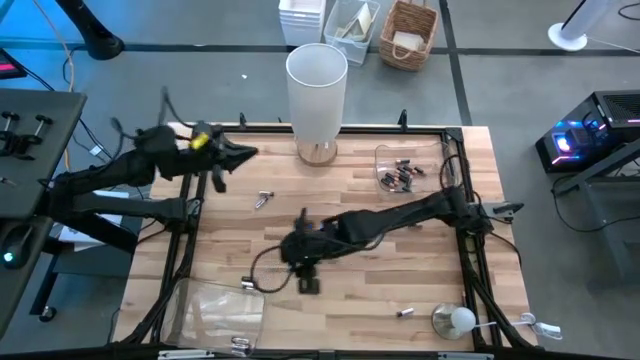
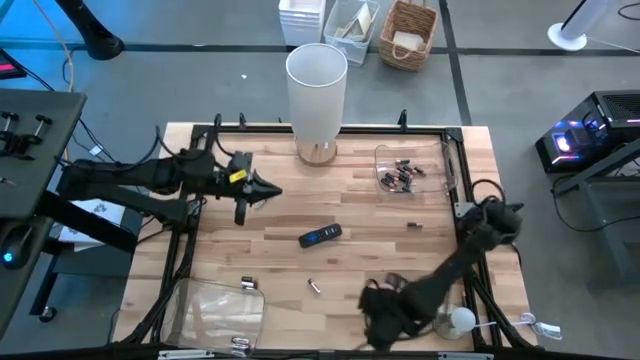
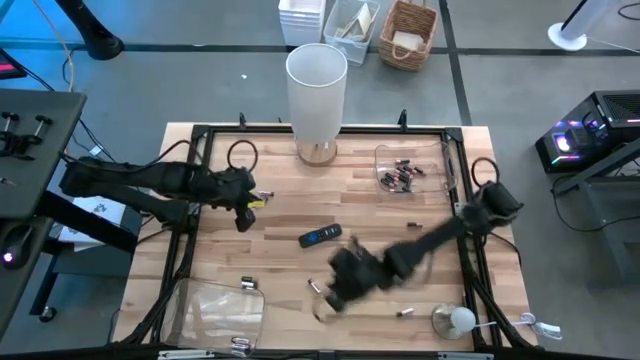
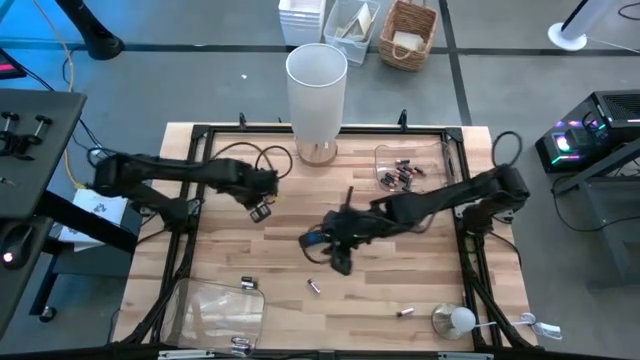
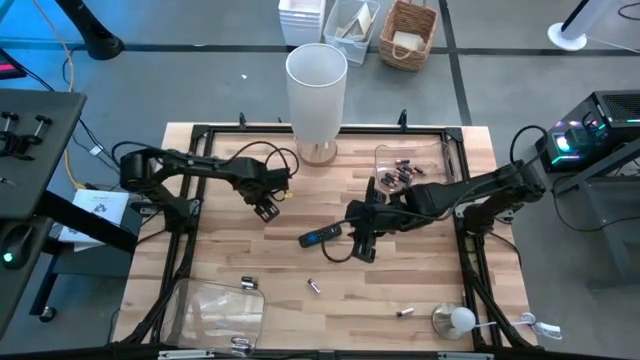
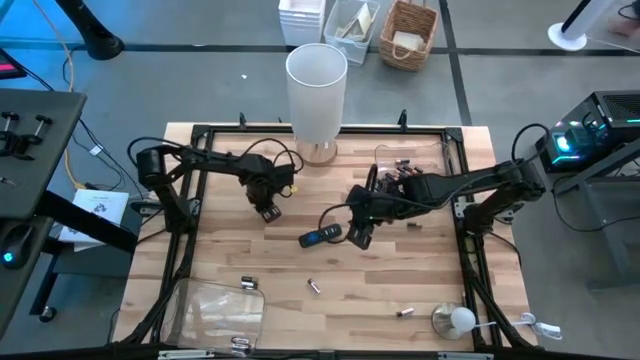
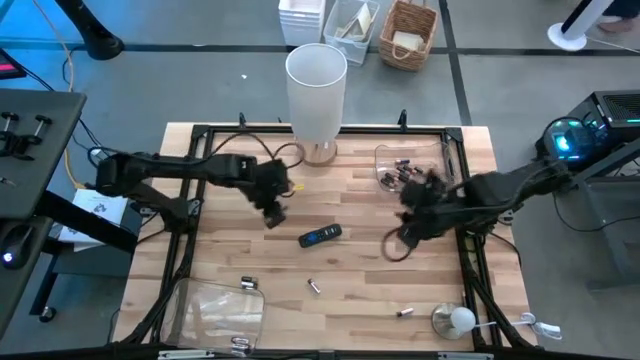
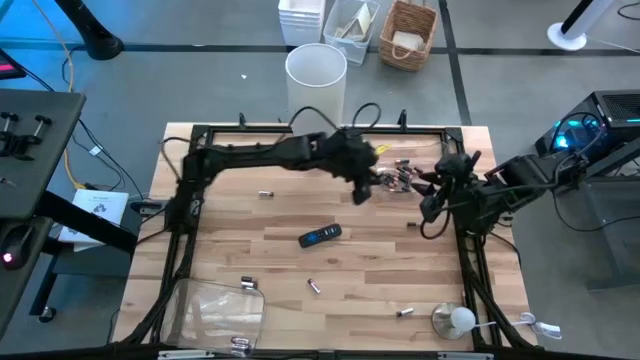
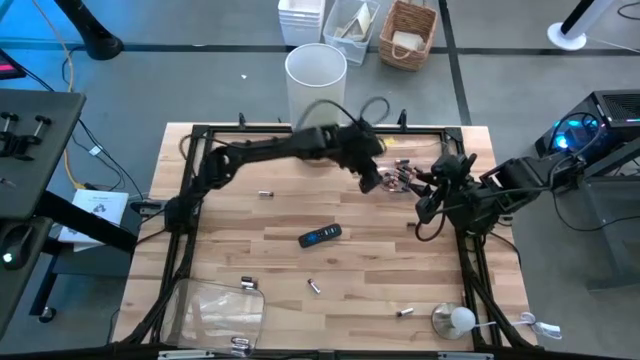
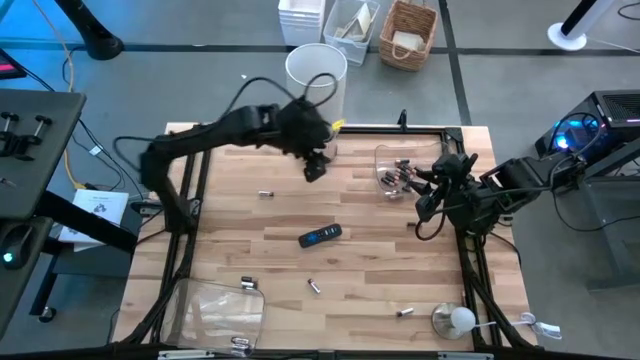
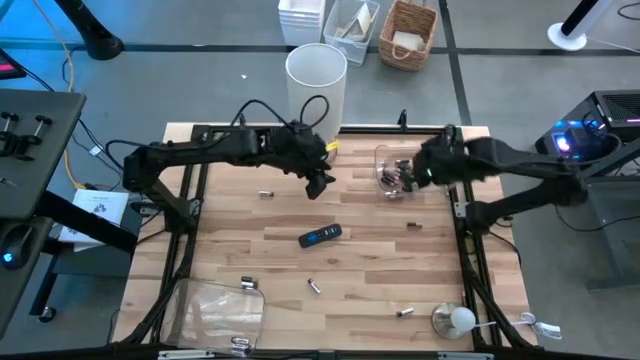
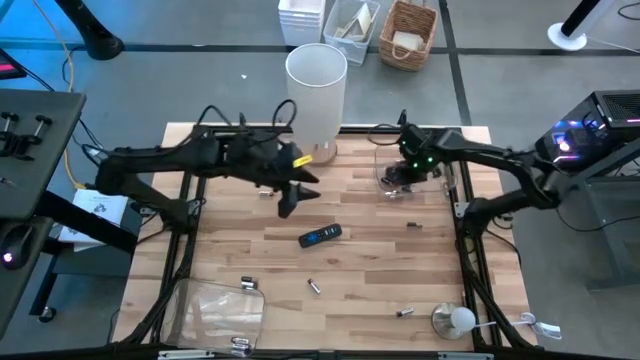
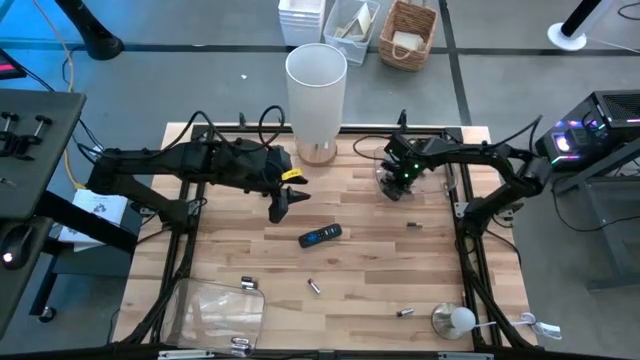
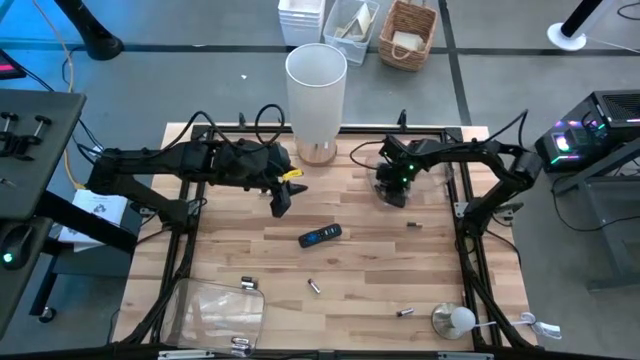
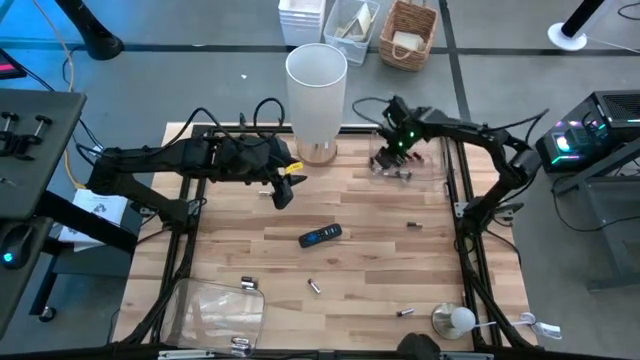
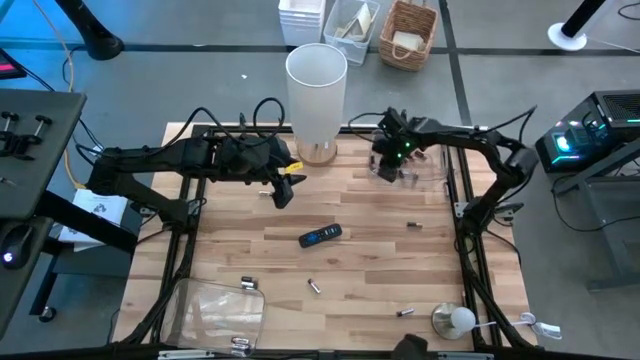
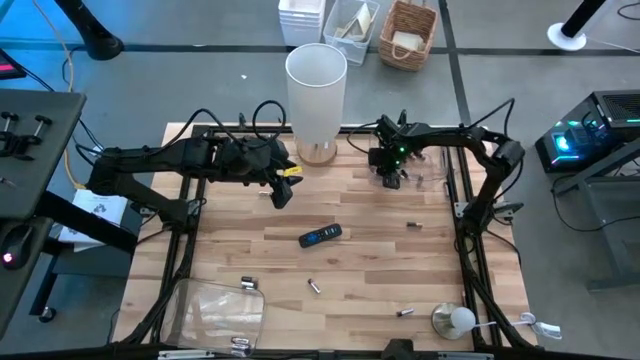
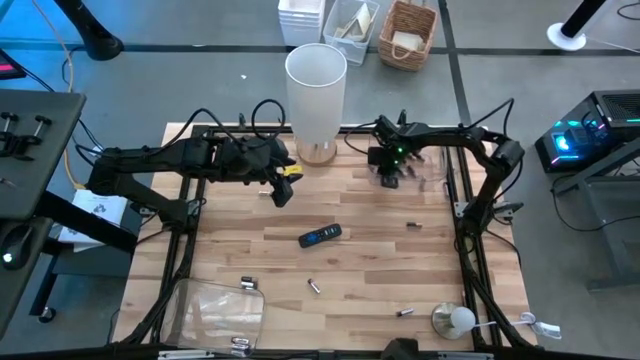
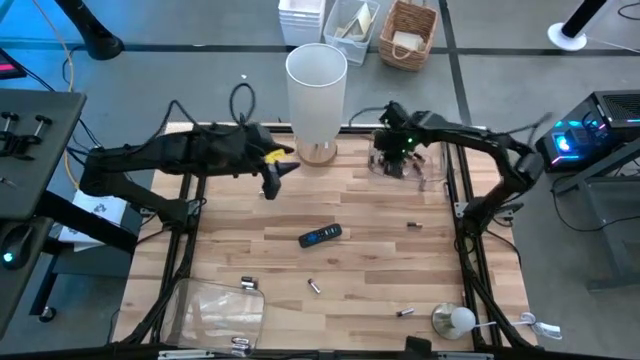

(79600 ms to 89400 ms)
Task: Sort batteries
Put the silver battery into the bottom transparent bin

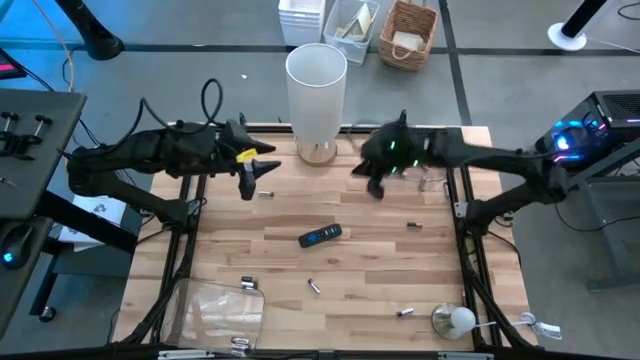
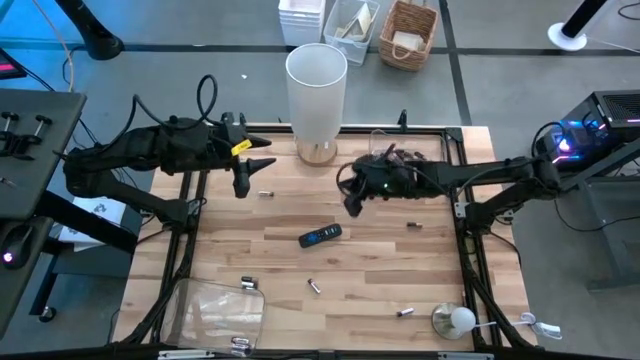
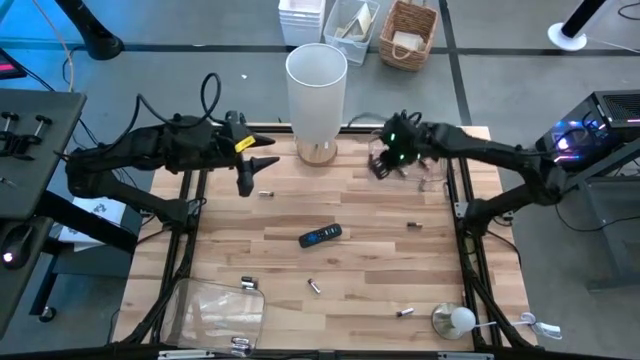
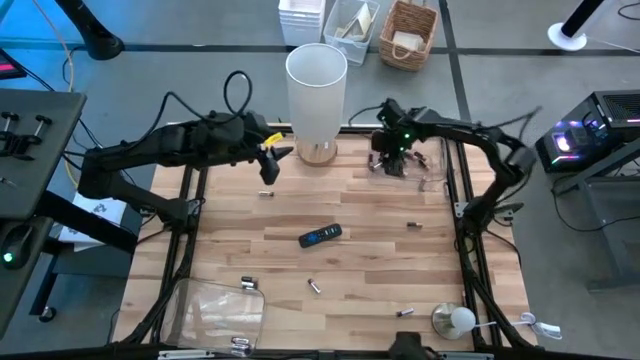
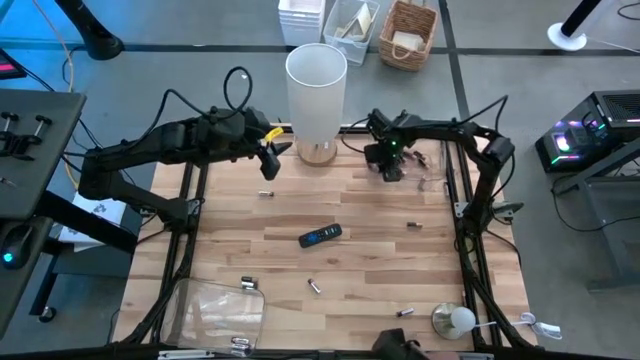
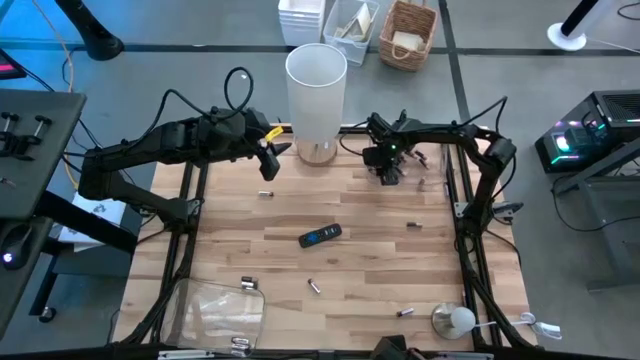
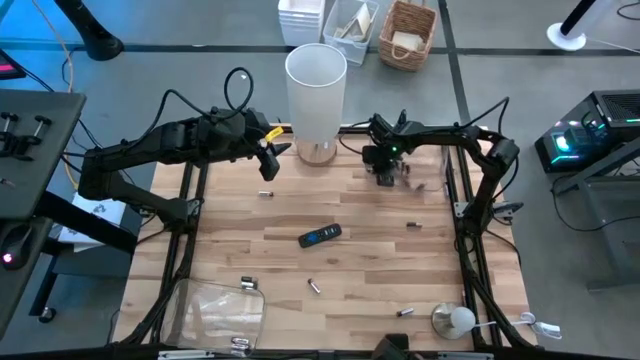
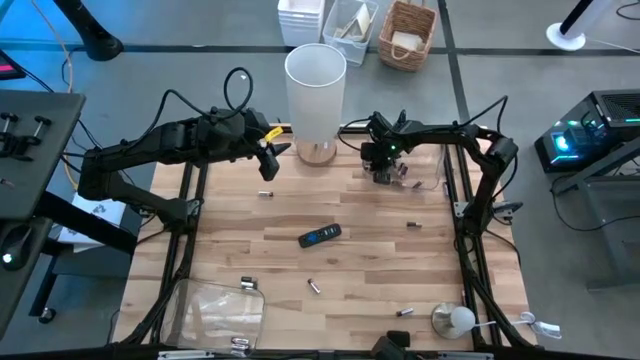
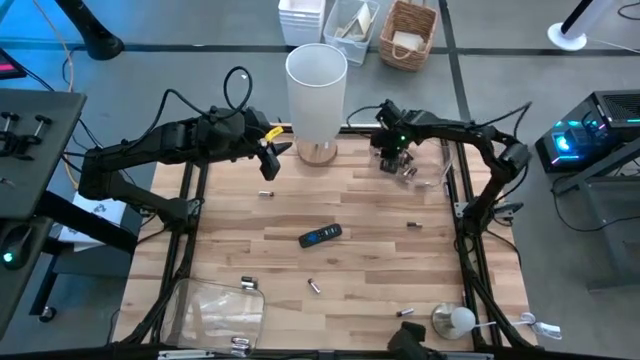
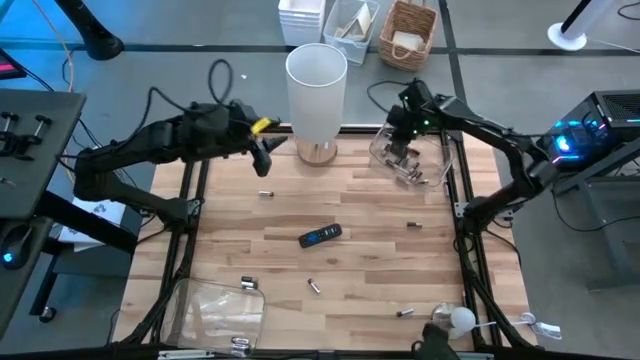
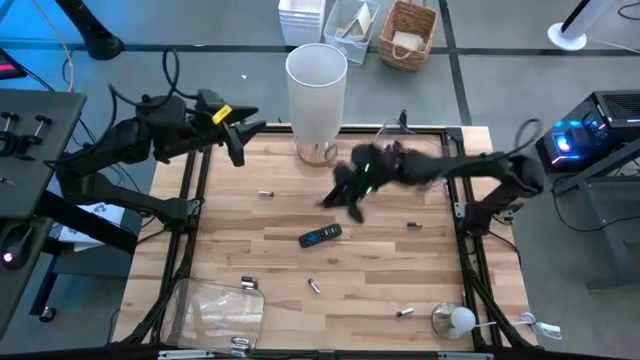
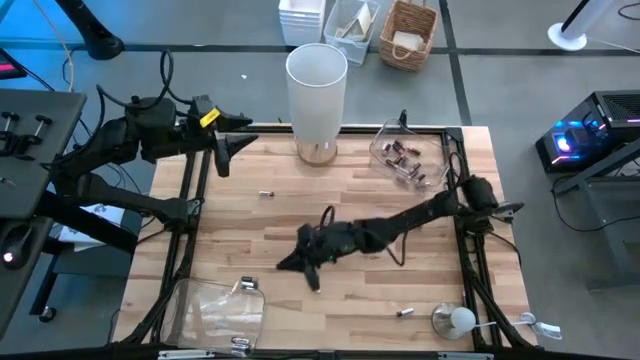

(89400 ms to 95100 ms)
Put the silver battery into the bottom transparent bin

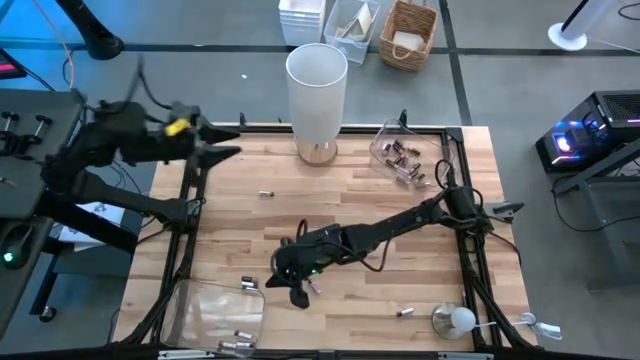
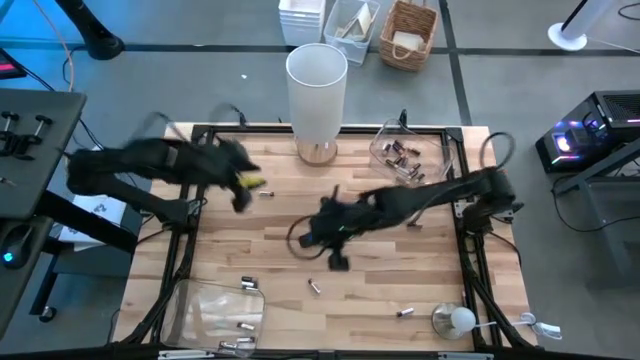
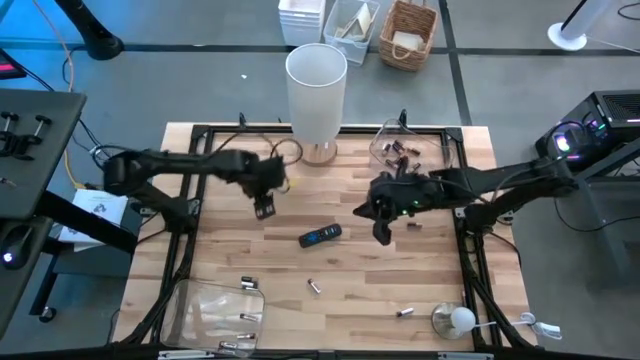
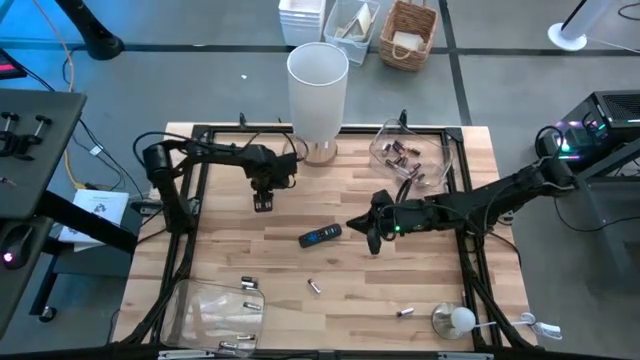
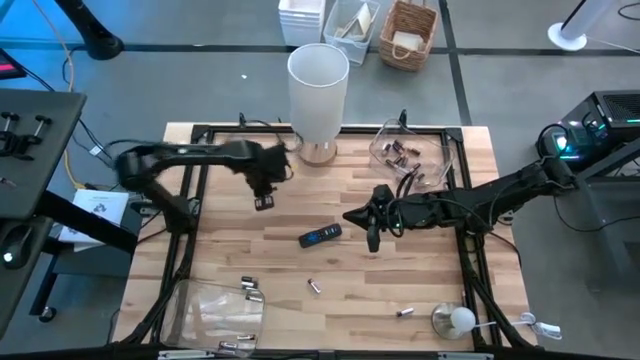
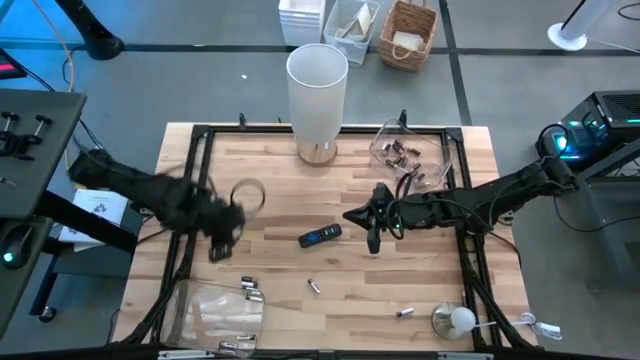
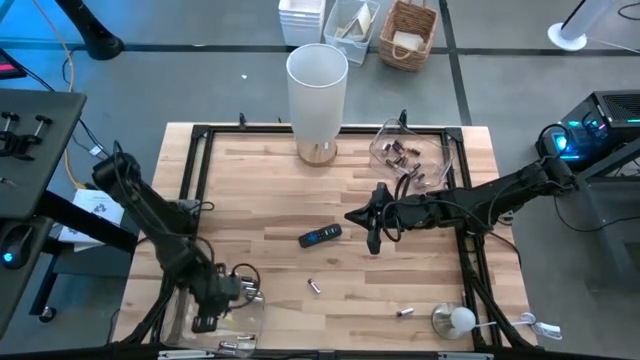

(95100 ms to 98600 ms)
Put the silver battery into the bottom transparent bin

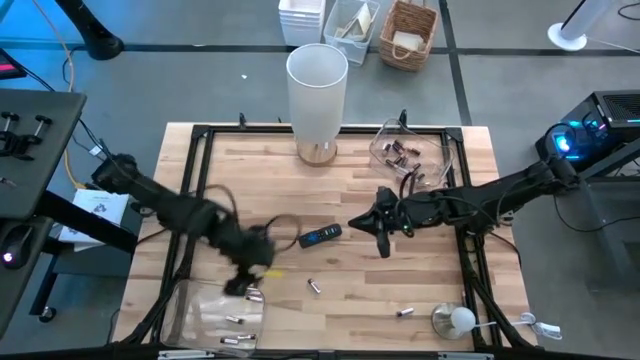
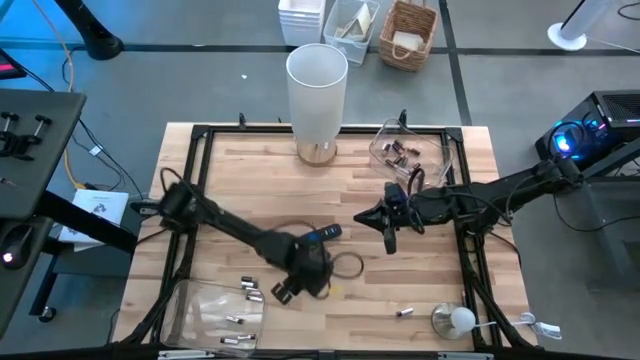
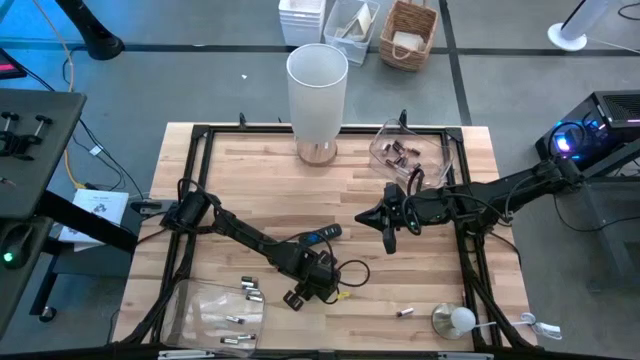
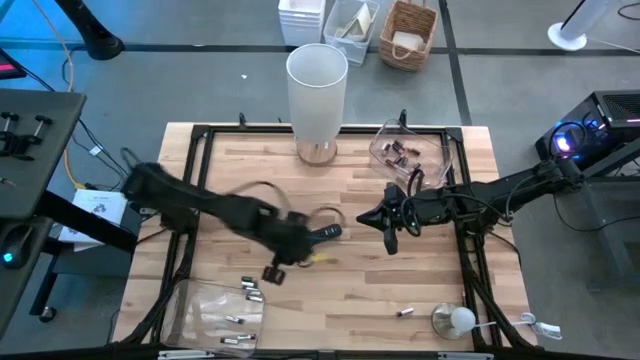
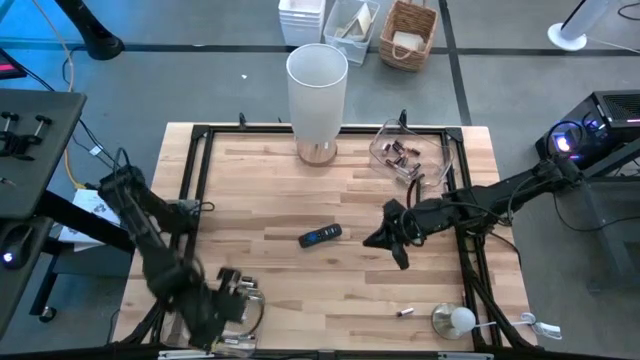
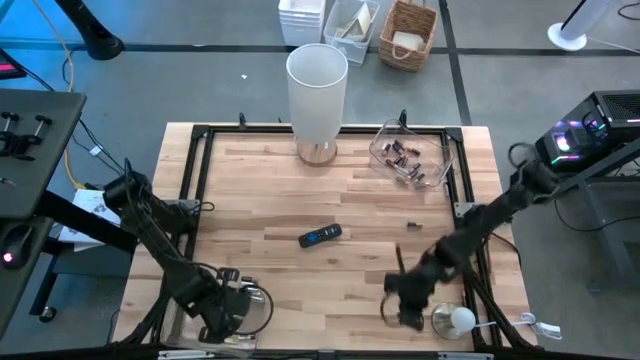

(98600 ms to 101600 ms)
Put the silver battery into the bottom transparent bin
